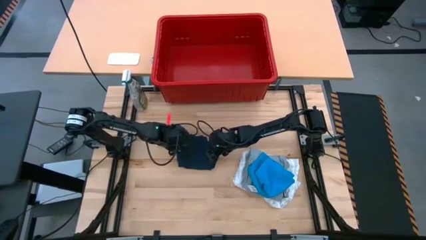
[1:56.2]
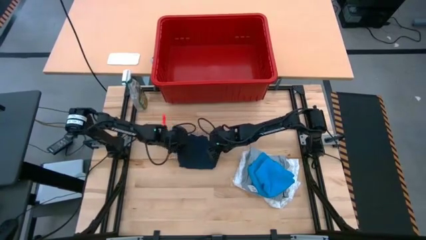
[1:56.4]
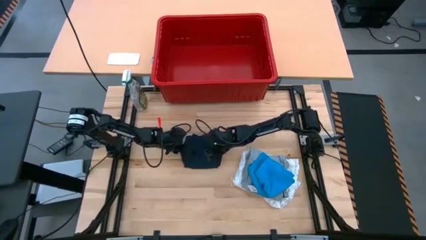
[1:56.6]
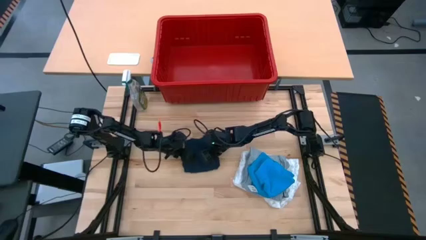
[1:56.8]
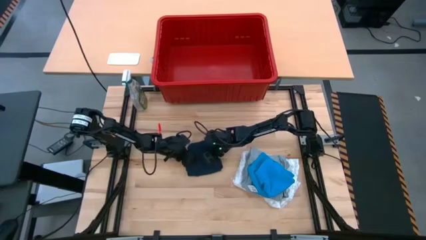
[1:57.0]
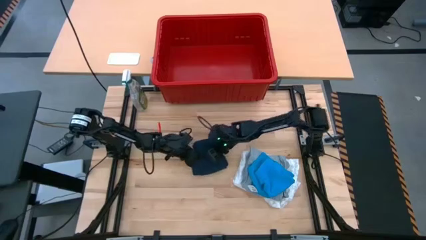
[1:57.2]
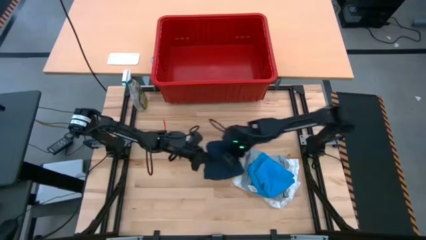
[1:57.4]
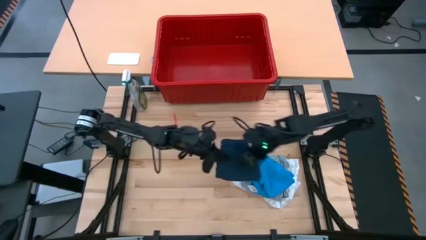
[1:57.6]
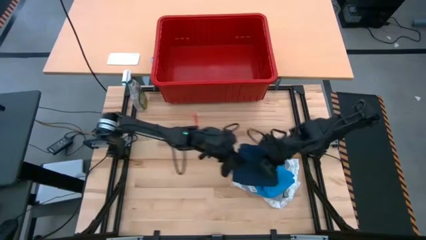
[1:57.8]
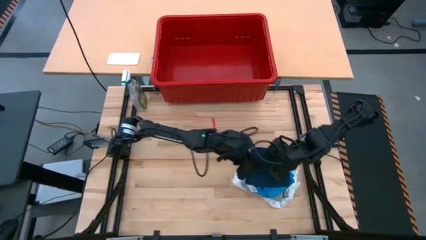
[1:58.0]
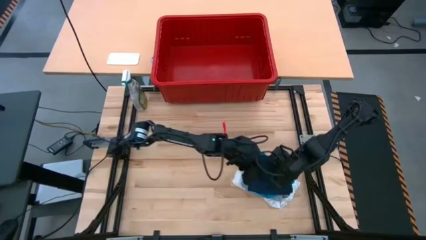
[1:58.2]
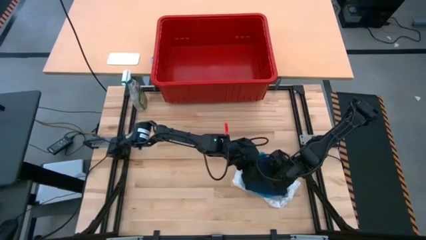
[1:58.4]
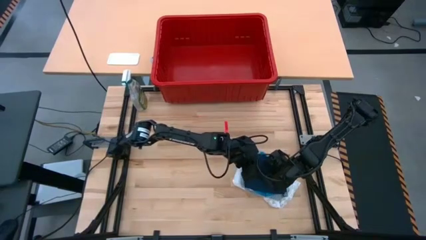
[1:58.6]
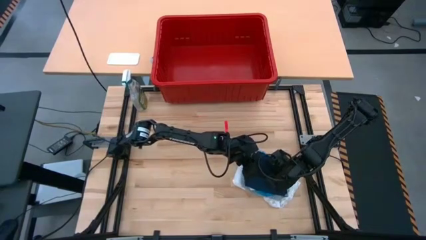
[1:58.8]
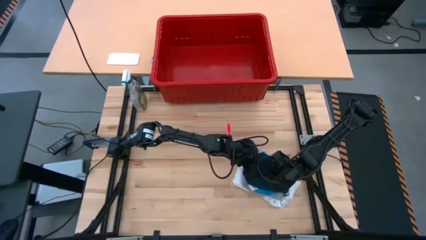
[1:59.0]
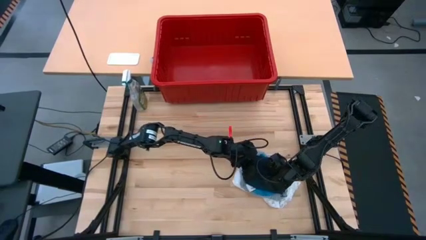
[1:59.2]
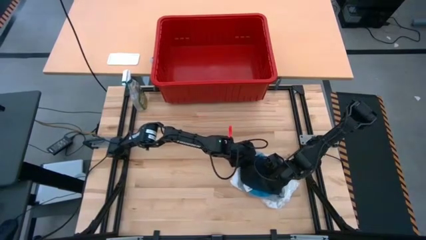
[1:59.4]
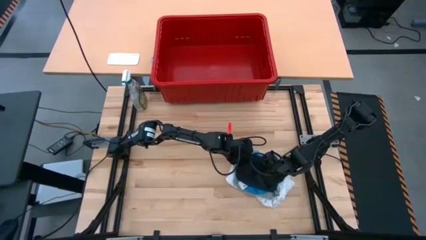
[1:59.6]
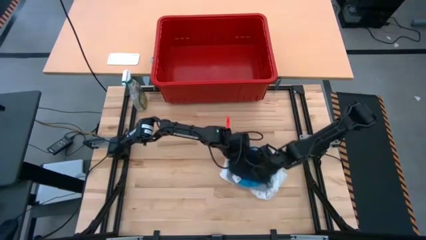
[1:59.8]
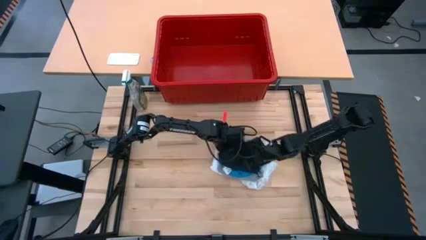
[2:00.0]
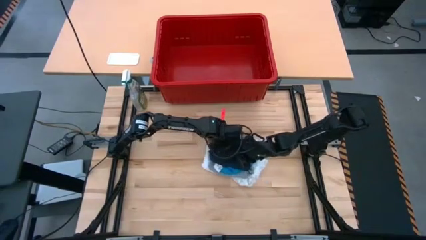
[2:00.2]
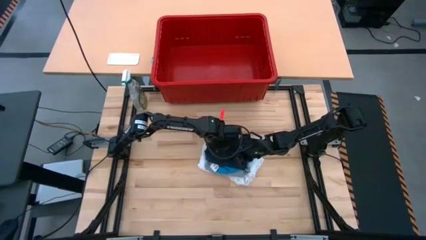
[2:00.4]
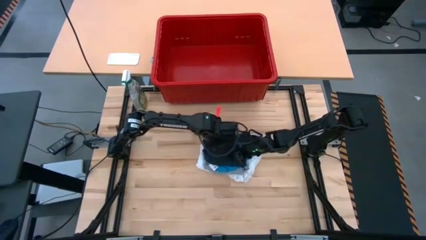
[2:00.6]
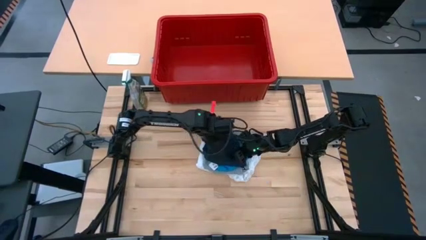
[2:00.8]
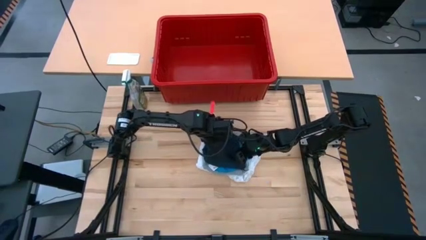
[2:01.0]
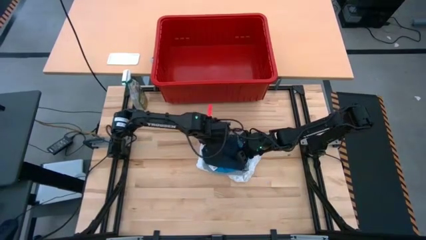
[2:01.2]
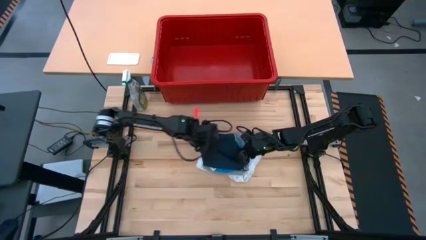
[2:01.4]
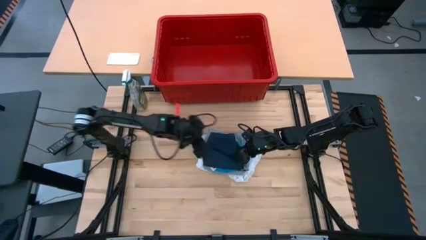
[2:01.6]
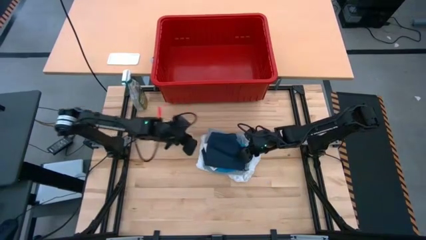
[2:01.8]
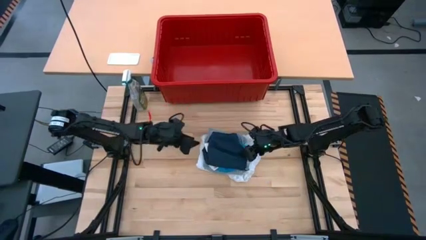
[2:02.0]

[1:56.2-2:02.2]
Task: Fold laundry
Stack the blue shorts on top of the light blue shorts

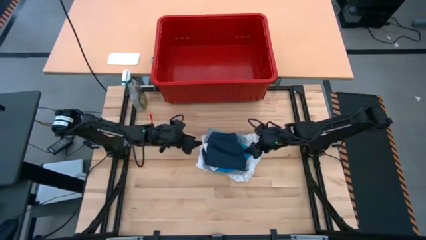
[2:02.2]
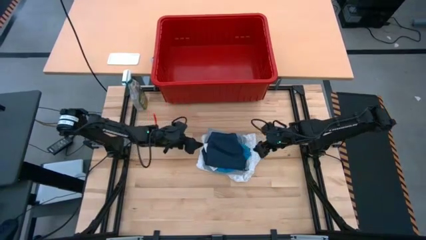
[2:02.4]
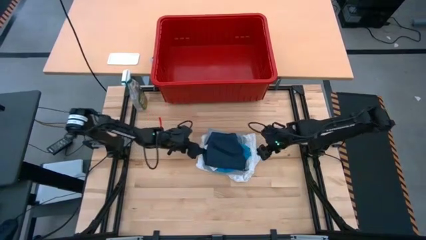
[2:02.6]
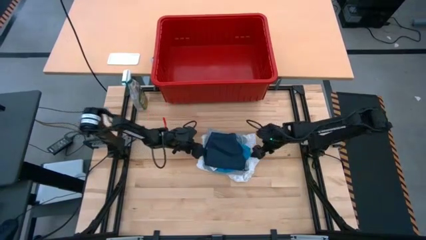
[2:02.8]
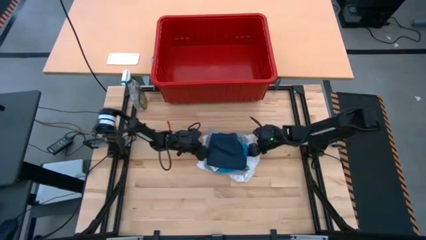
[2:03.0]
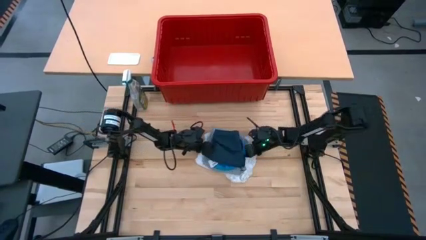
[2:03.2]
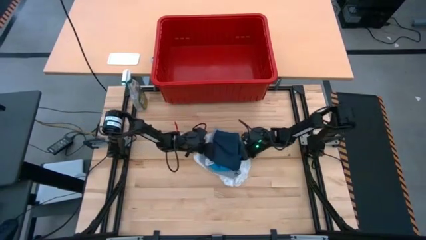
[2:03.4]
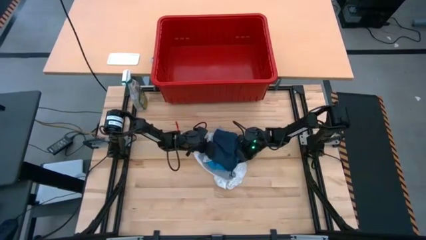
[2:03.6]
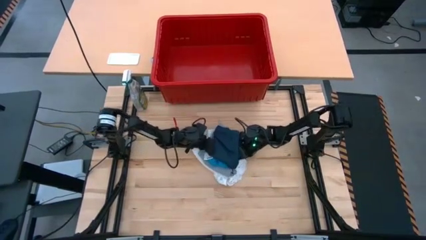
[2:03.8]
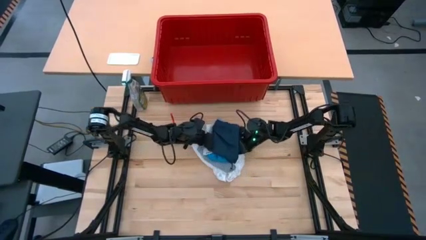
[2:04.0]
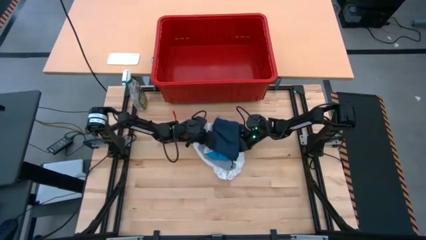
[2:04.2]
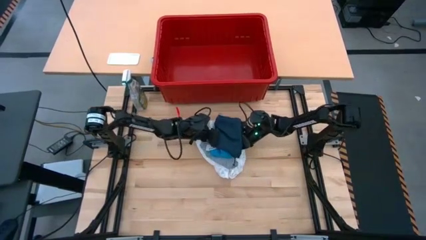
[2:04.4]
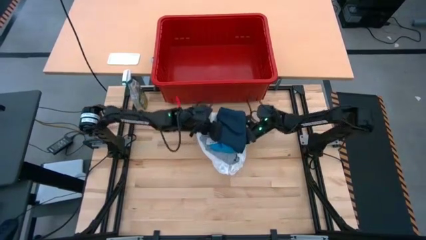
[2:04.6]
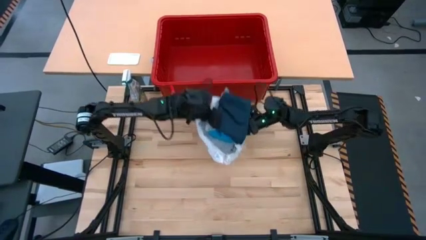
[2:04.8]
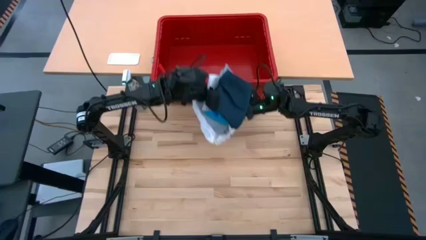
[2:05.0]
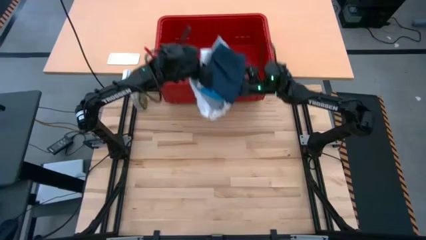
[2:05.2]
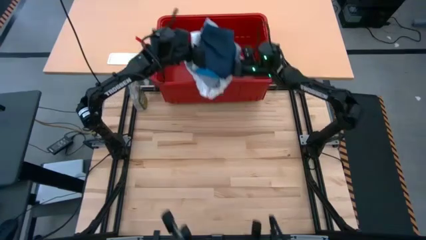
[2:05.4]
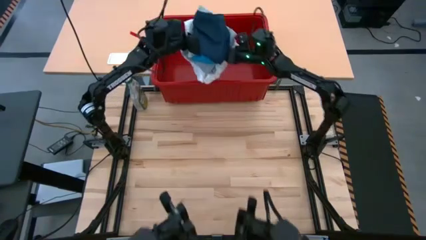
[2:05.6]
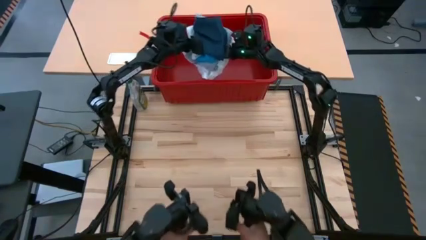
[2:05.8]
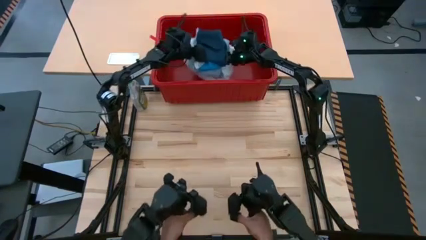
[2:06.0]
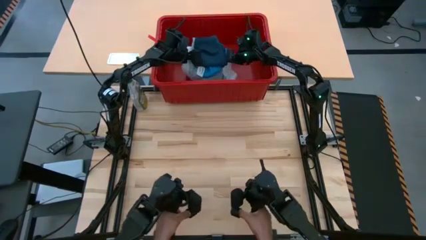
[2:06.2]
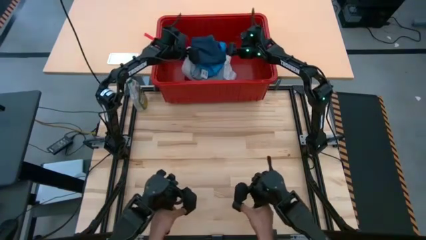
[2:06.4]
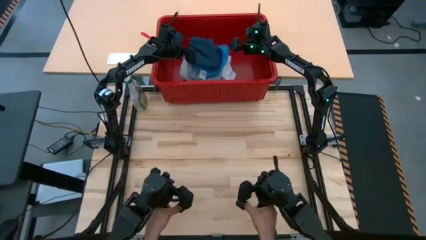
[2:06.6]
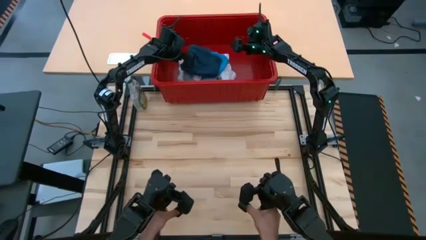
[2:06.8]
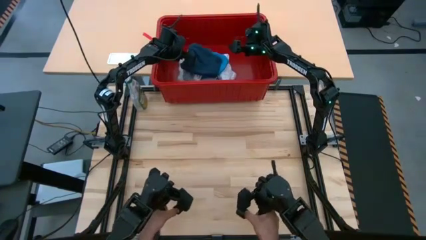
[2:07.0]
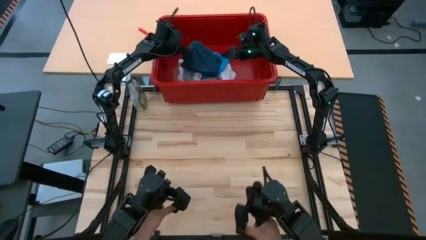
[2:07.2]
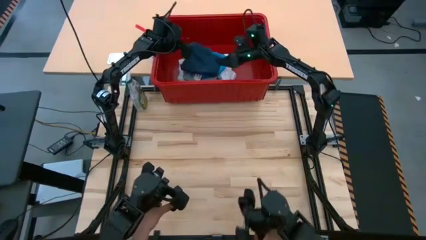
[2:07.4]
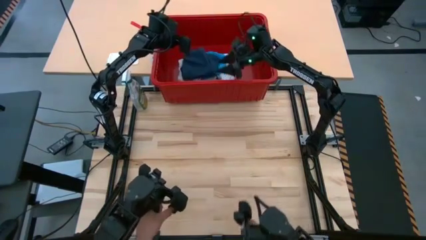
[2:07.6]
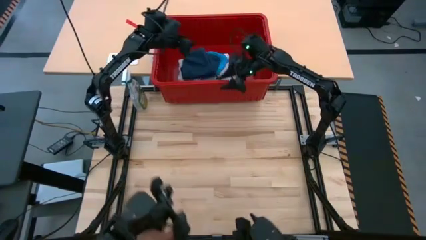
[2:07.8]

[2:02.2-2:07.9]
Put the stacked clothes into the red laundry bin

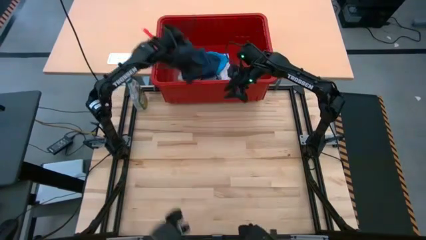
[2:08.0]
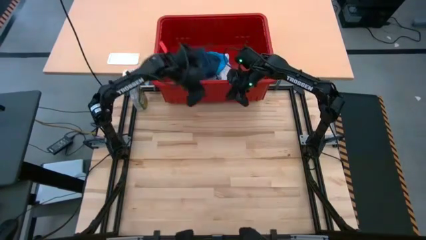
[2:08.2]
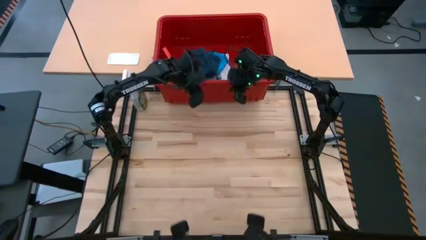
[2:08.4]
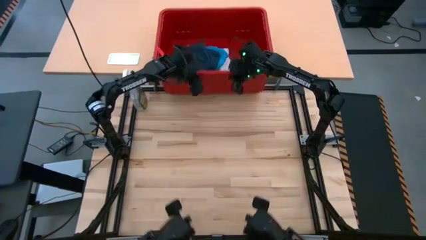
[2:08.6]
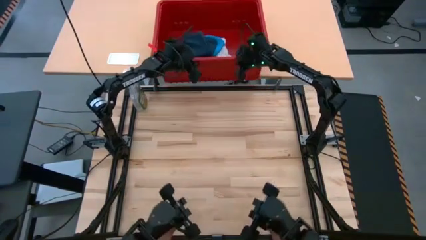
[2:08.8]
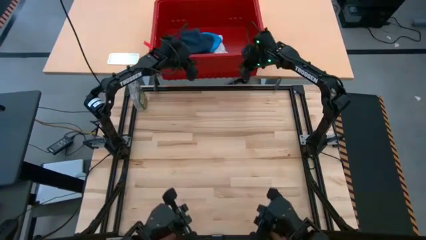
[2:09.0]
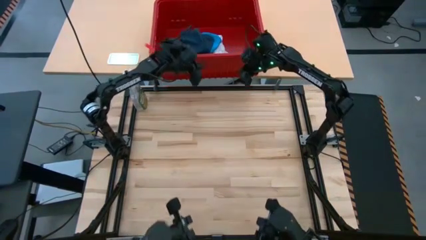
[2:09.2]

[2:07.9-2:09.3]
Adjust the red laundry bin

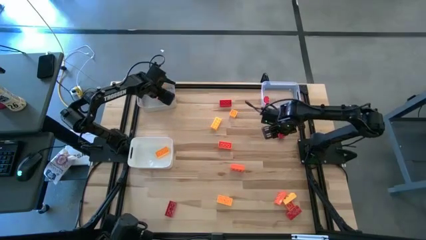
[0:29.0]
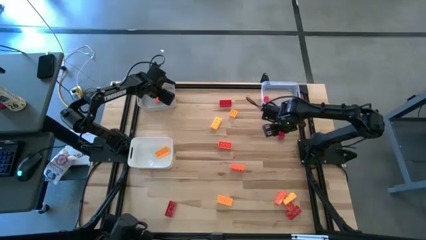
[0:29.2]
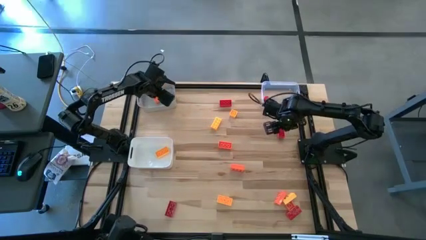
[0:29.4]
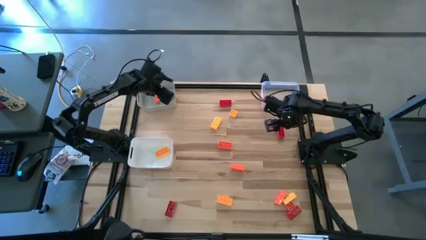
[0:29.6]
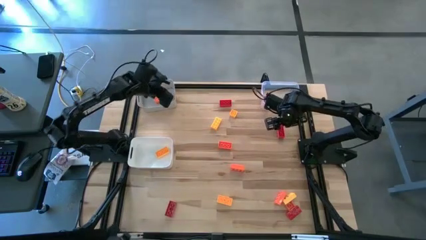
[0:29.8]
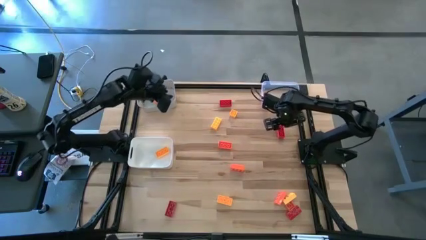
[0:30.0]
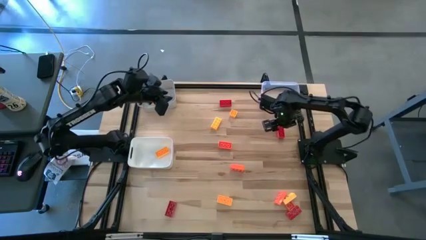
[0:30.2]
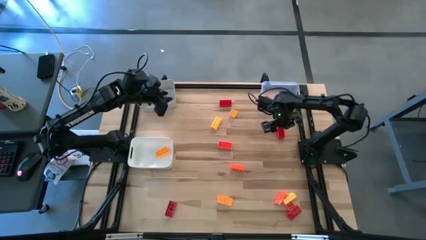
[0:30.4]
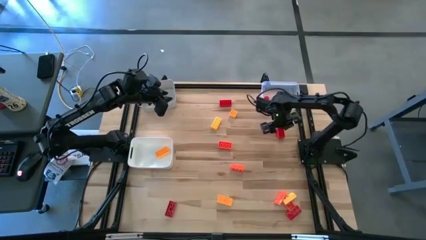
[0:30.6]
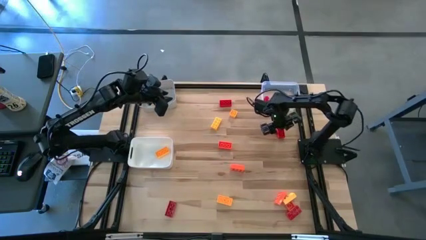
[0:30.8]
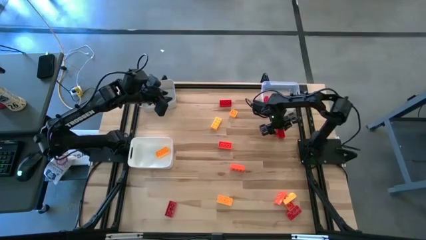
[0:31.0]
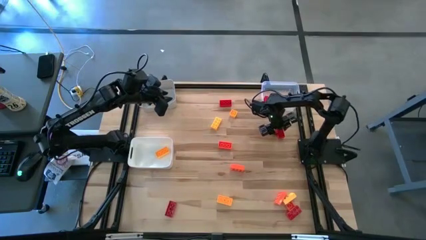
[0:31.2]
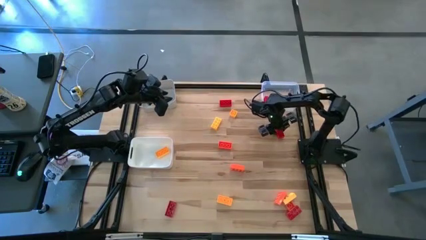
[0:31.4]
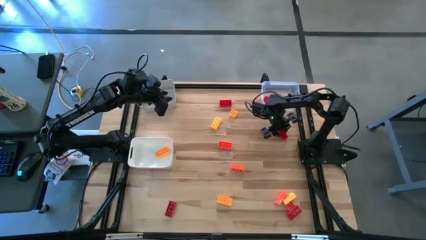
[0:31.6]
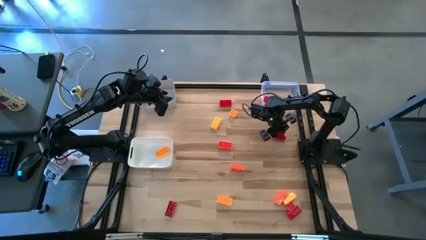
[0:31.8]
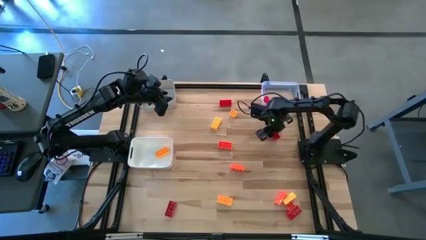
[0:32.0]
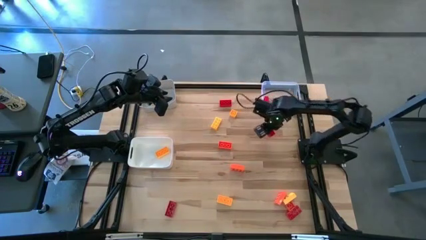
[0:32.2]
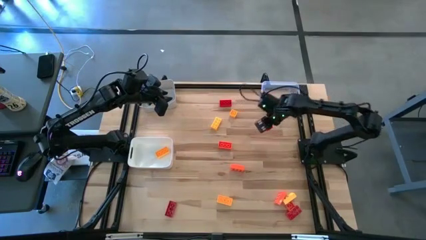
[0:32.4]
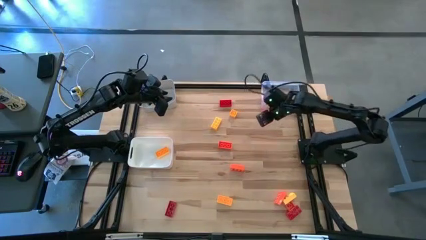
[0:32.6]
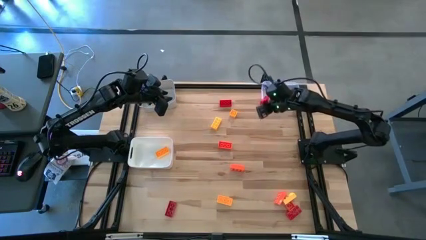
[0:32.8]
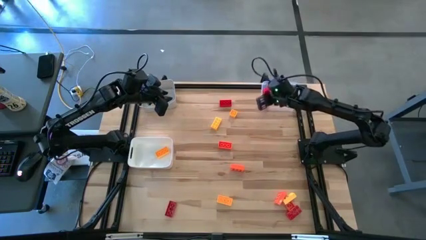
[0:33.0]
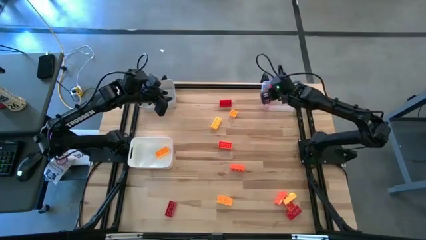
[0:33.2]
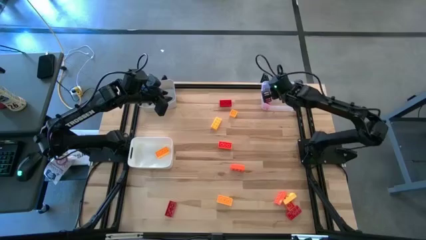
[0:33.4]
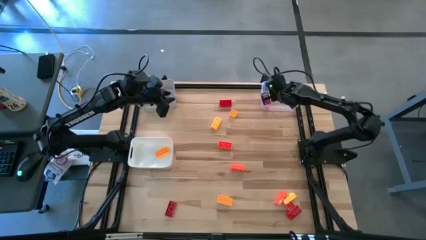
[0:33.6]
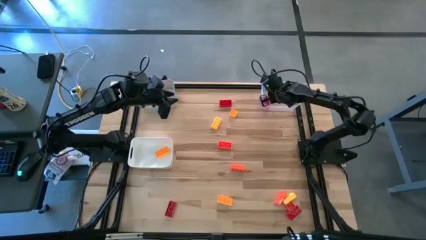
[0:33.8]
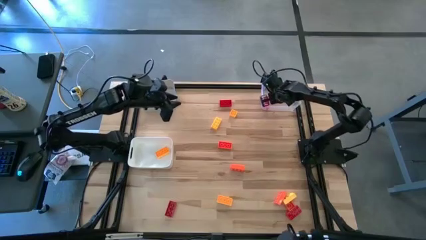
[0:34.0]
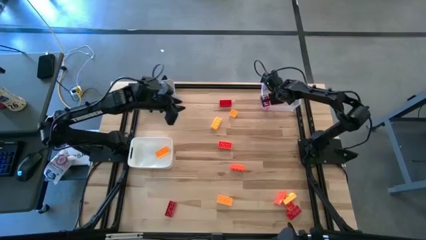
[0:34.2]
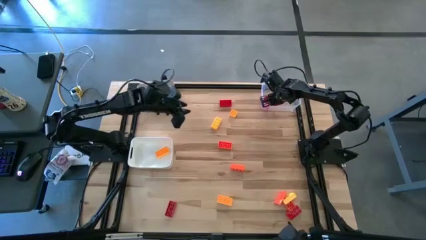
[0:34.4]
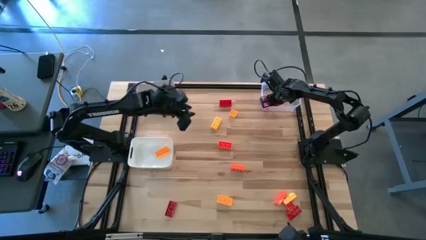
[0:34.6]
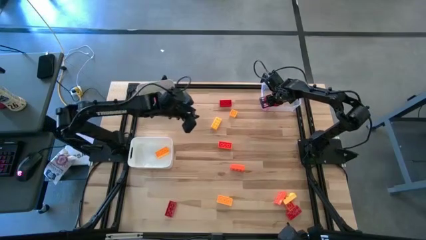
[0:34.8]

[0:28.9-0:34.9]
Task: Sort & place blocks by color
Put the red game piece into the transparent bin
